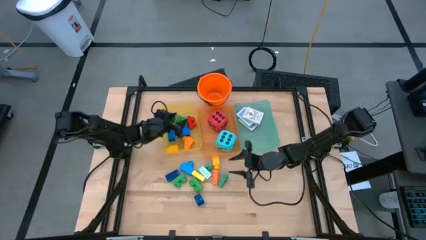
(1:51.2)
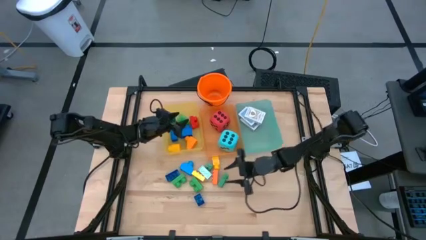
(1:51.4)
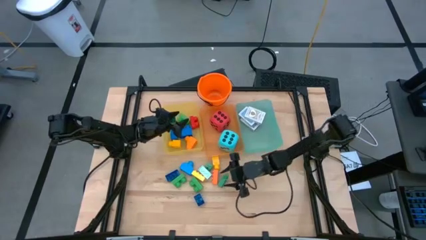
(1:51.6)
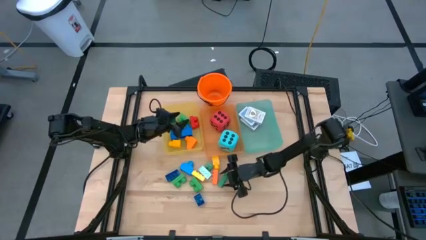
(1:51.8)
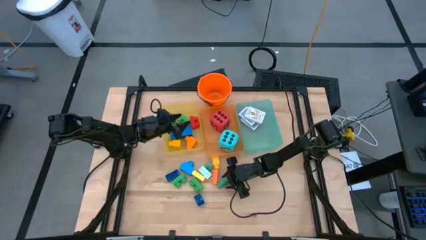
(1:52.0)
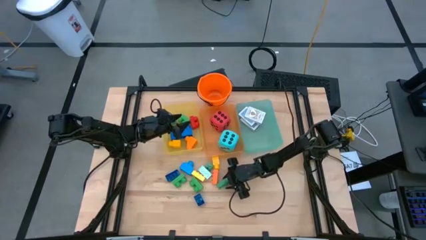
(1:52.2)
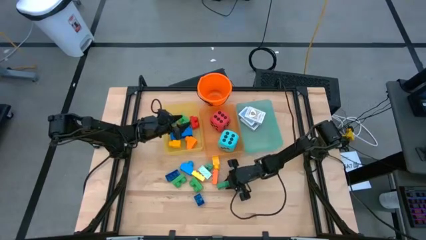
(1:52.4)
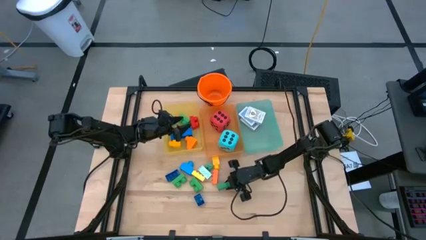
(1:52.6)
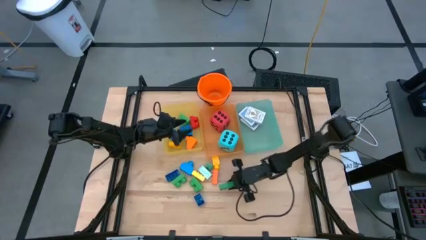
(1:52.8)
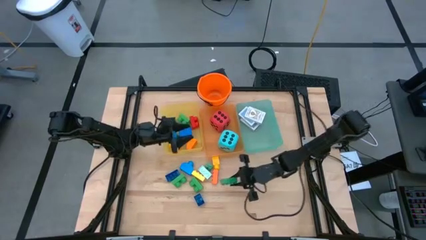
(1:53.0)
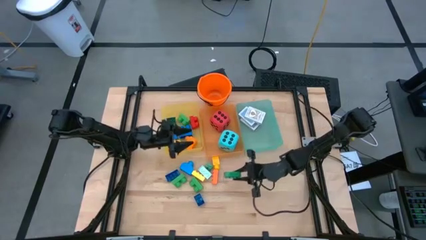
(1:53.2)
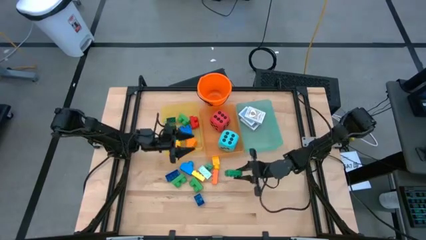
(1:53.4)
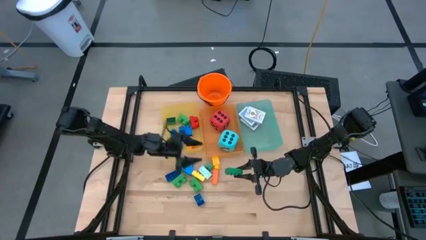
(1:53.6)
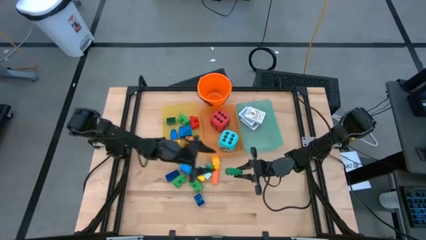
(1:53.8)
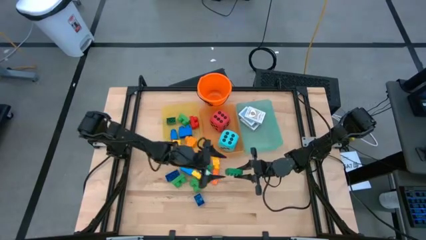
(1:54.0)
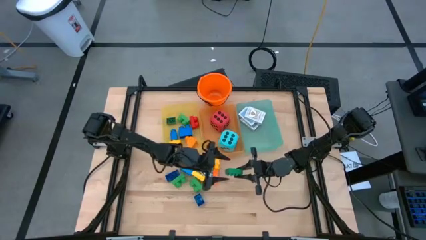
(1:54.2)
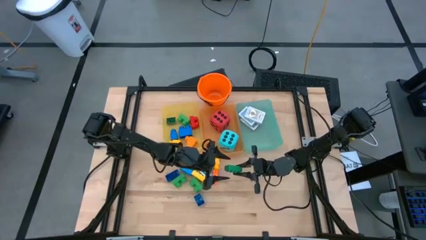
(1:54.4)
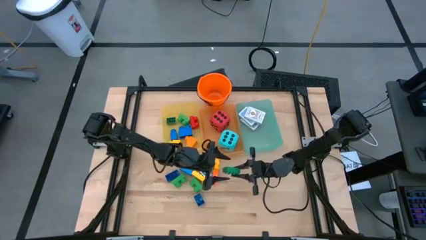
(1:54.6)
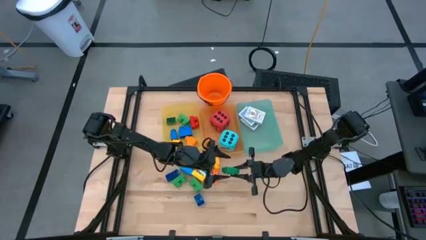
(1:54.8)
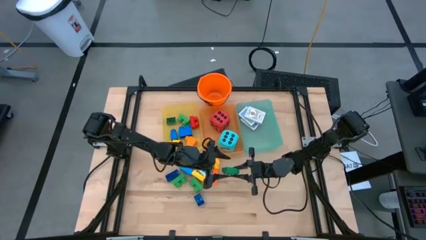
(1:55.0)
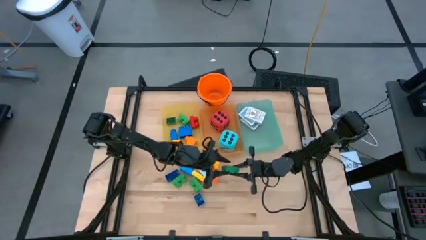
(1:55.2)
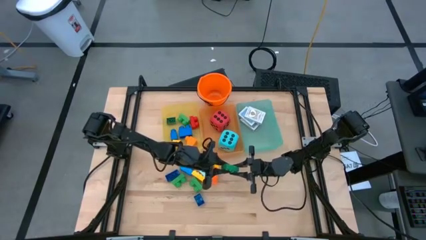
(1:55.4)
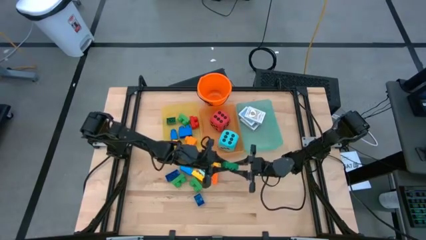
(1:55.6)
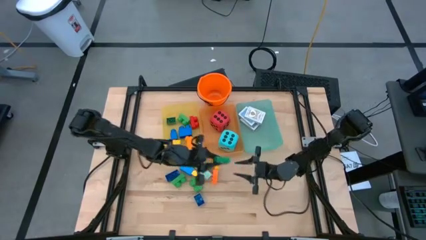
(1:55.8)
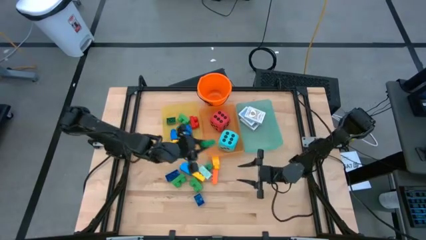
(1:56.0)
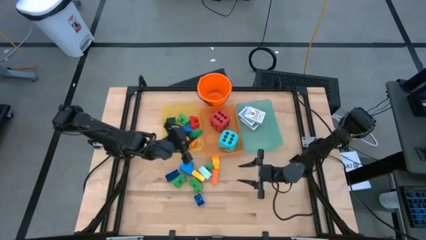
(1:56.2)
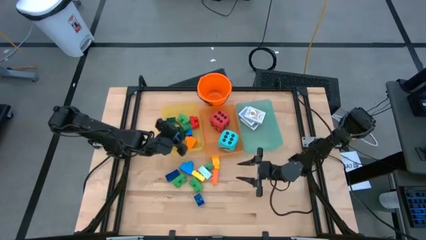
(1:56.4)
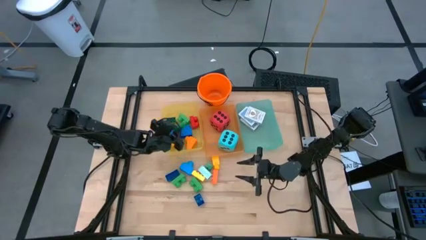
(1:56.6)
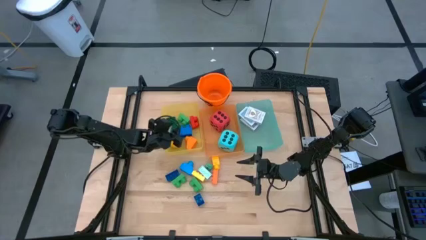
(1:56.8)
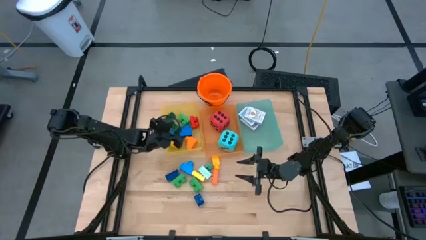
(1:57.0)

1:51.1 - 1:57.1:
Task: Pick & Place Toys
Put the bottom green game piece into the yellow bin

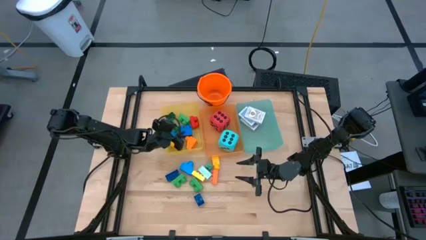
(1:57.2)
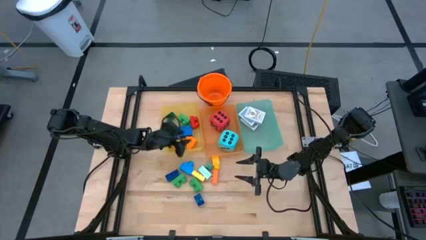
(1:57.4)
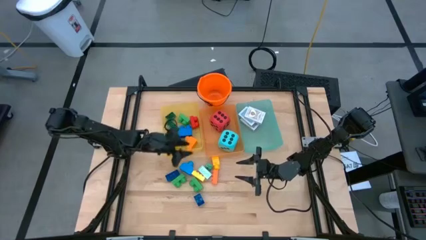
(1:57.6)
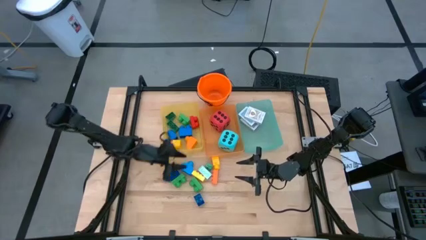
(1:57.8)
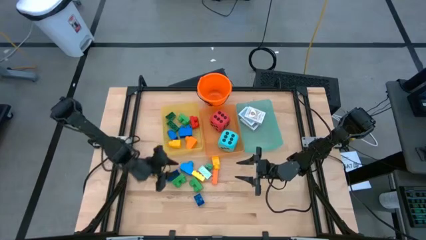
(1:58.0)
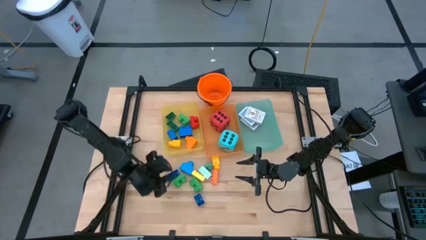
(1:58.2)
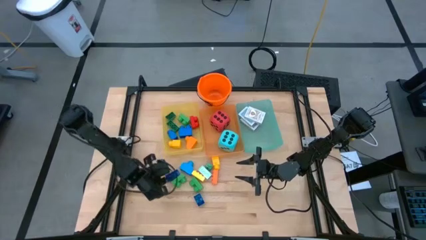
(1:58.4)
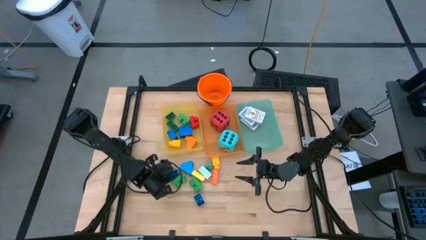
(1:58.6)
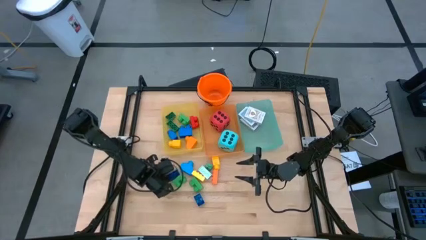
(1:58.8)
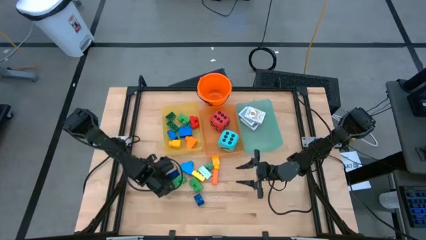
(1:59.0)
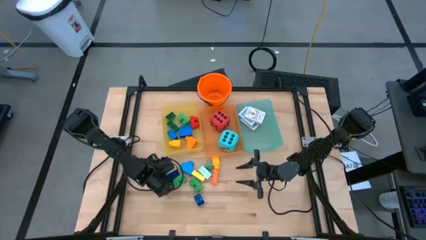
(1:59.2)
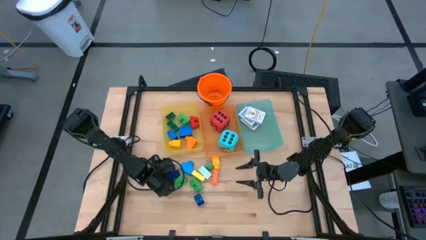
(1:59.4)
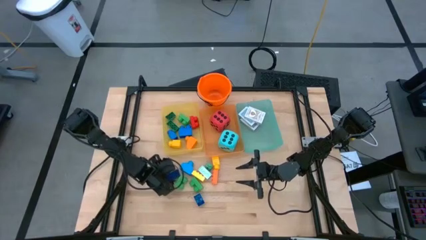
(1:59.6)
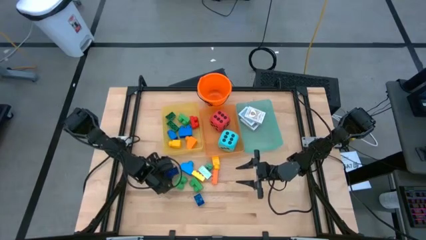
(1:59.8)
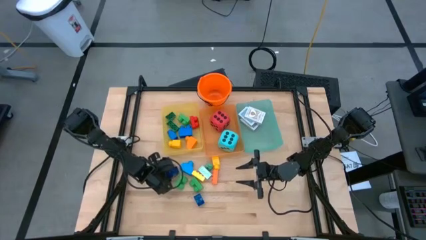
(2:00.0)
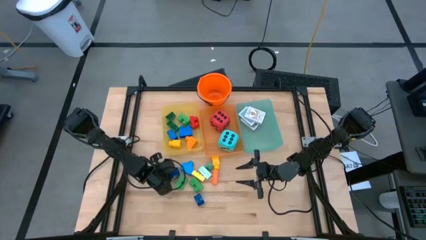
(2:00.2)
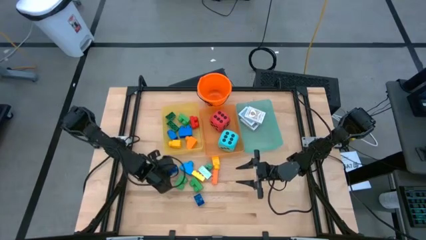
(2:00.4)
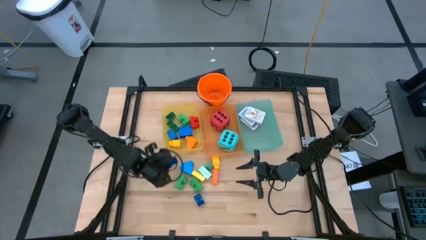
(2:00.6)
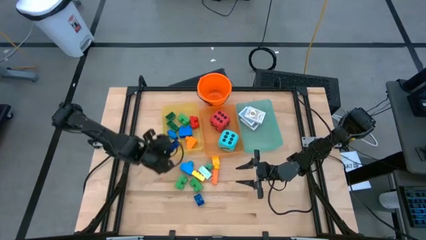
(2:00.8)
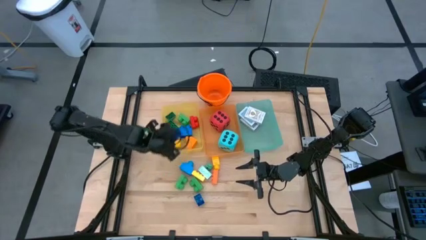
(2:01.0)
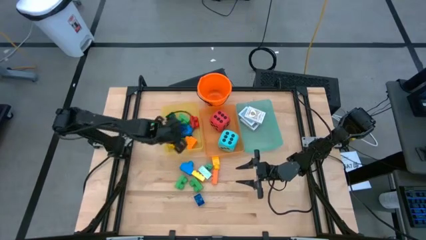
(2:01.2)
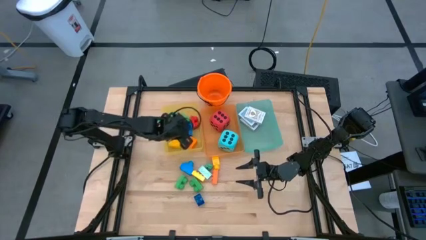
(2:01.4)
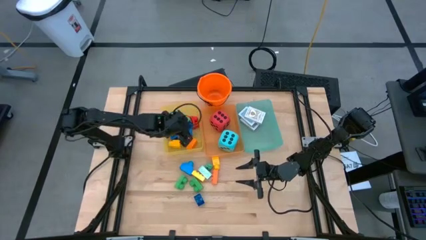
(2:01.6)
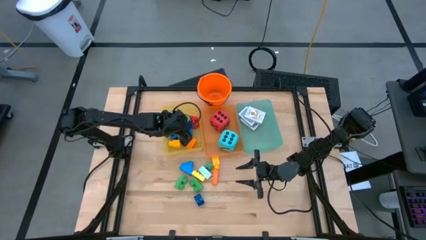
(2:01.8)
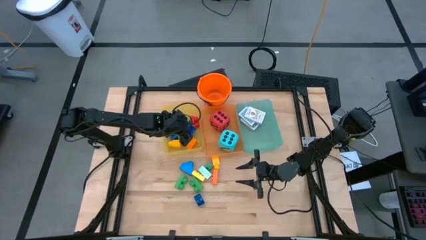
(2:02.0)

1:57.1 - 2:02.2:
Put the top dark blue game piece into the yellow bin

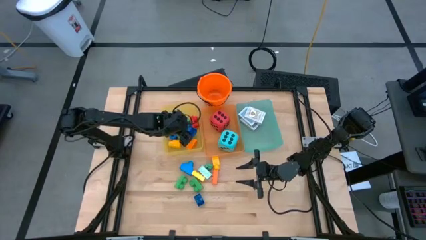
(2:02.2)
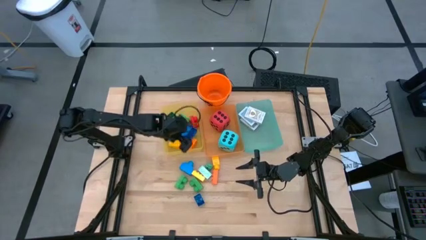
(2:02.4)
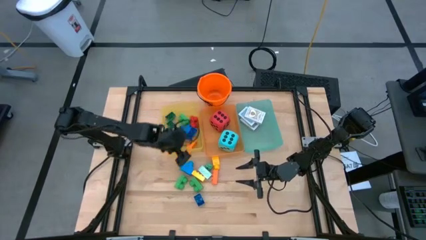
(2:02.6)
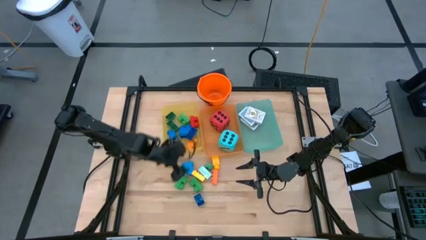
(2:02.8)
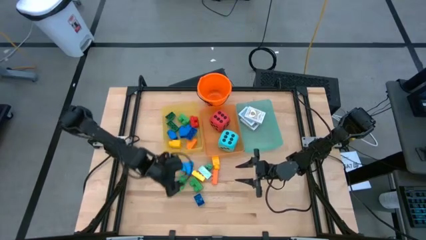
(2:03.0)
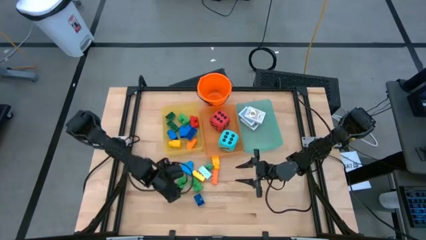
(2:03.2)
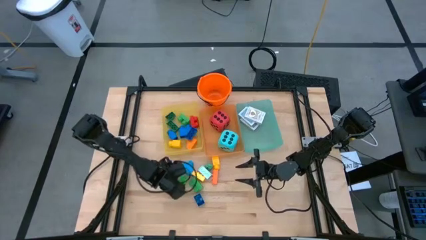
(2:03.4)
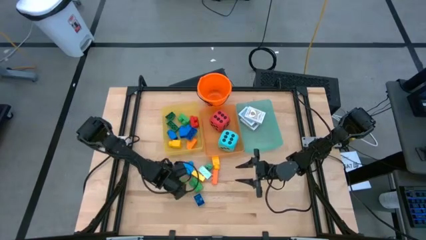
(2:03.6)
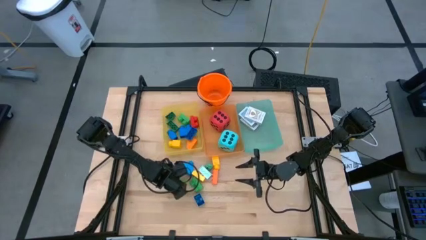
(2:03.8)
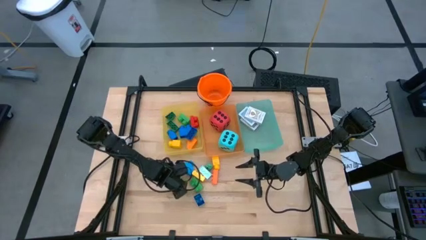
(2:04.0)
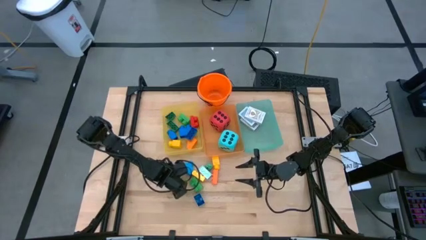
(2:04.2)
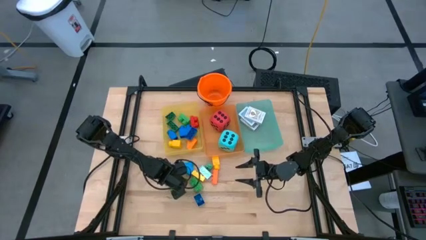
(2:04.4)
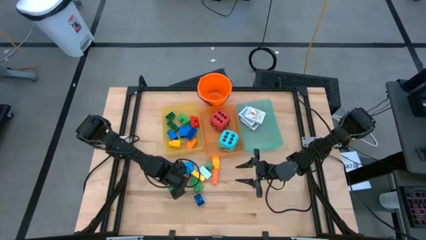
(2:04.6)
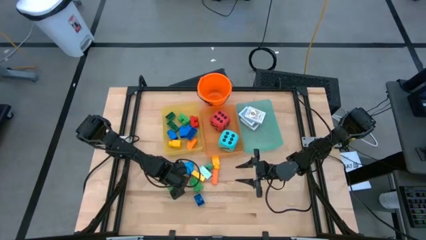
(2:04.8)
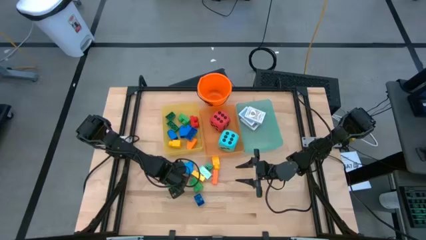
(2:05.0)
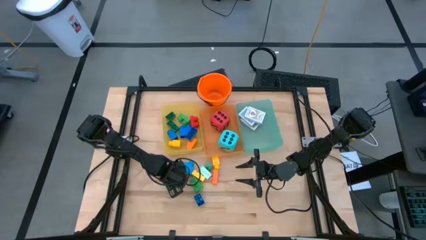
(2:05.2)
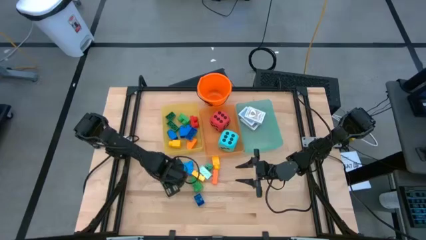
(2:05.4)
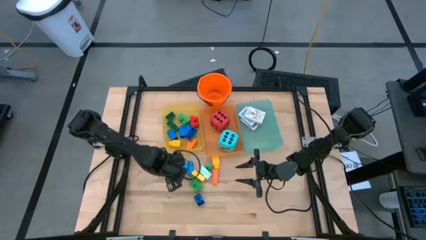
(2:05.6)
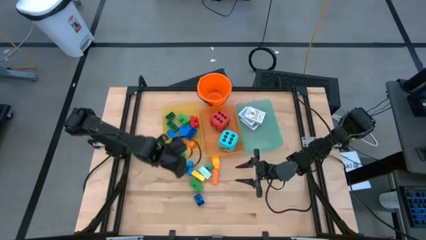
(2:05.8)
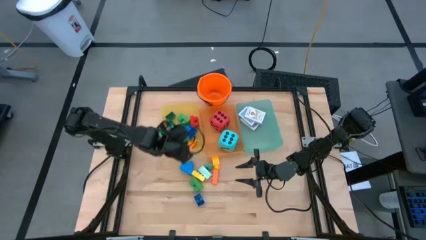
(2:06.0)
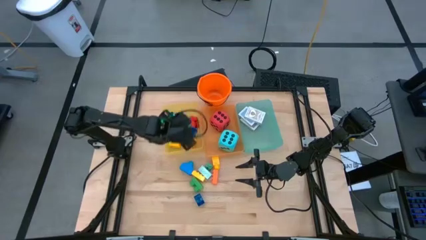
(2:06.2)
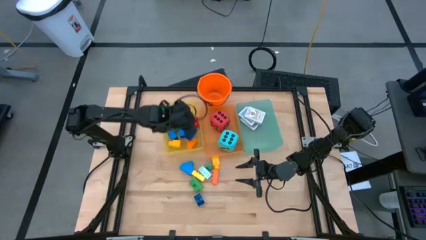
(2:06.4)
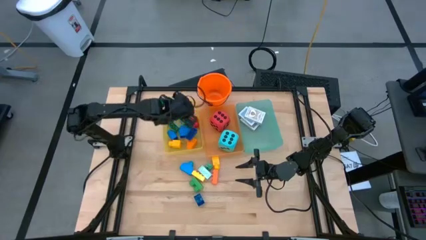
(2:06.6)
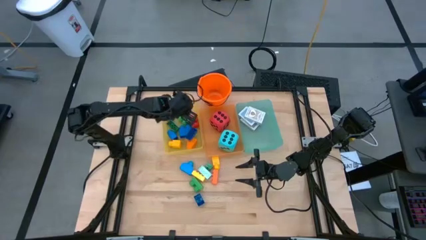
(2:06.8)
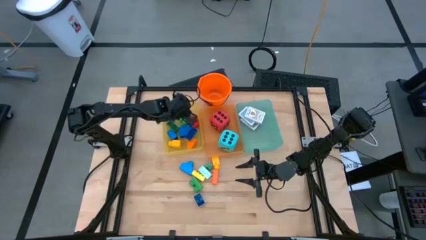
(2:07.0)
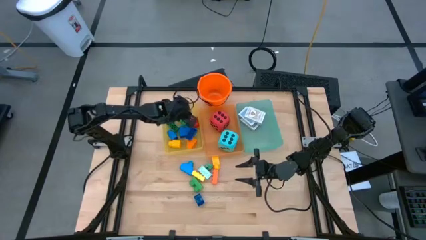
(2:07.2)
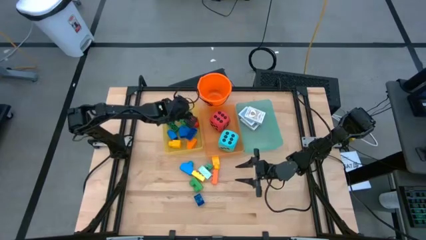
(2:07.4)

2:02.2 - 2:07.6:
Put the left green game piece into the yellow bin
